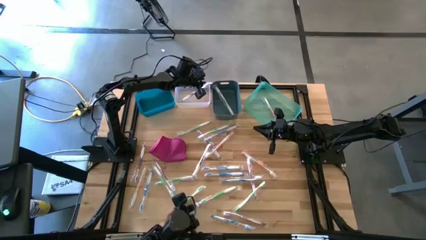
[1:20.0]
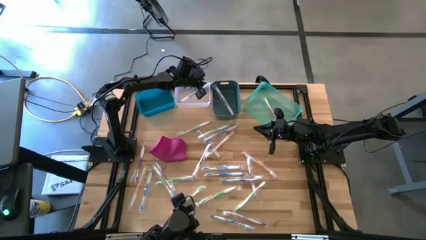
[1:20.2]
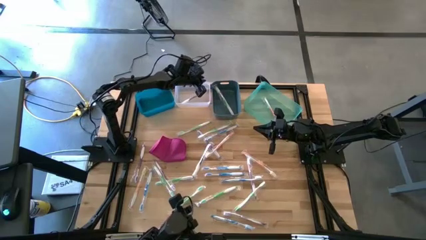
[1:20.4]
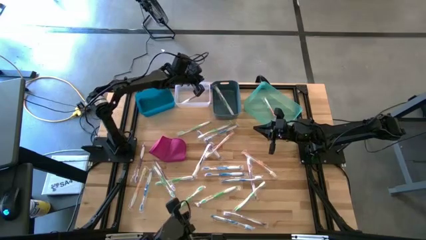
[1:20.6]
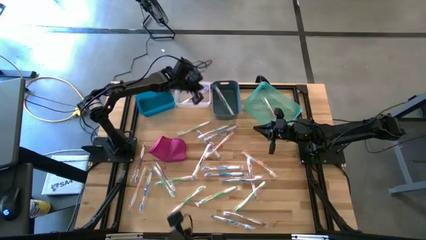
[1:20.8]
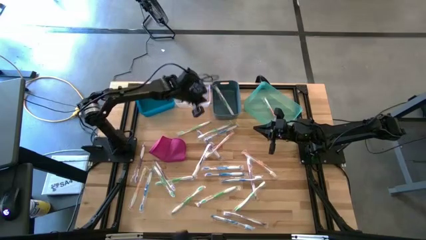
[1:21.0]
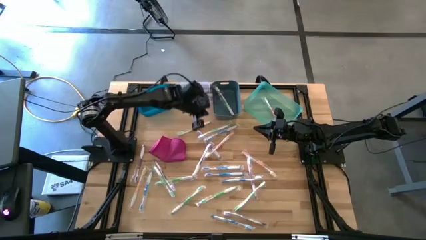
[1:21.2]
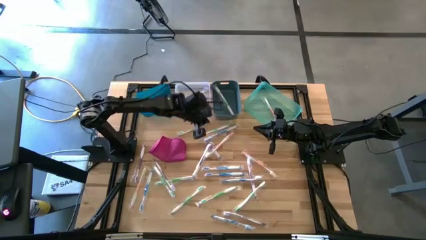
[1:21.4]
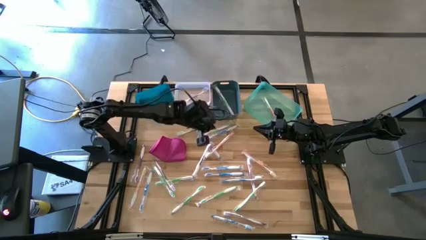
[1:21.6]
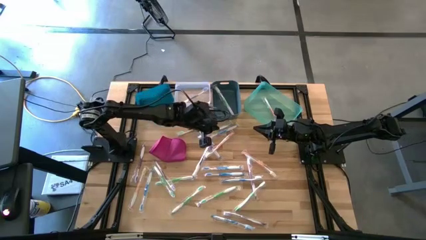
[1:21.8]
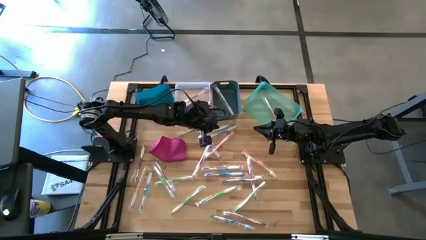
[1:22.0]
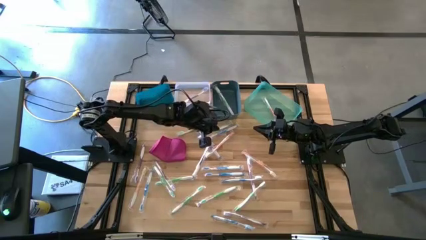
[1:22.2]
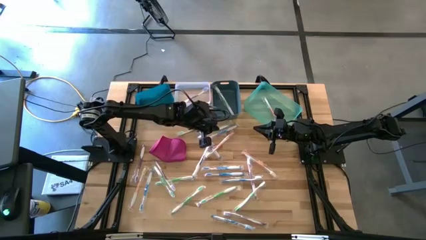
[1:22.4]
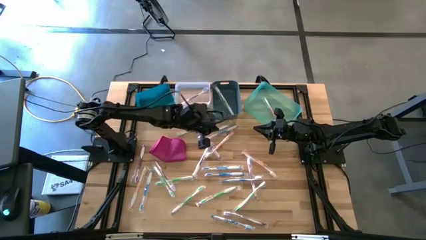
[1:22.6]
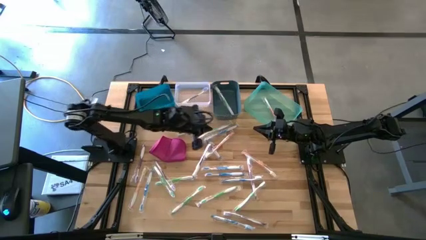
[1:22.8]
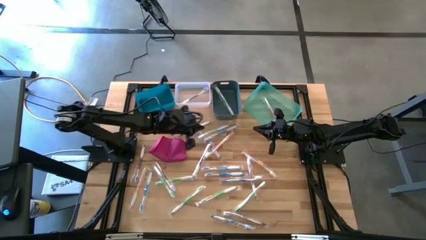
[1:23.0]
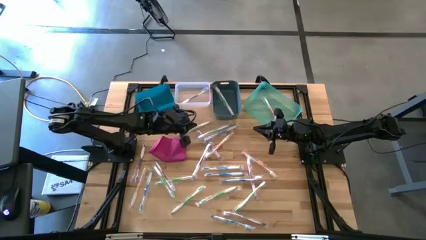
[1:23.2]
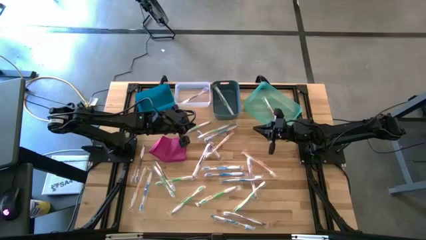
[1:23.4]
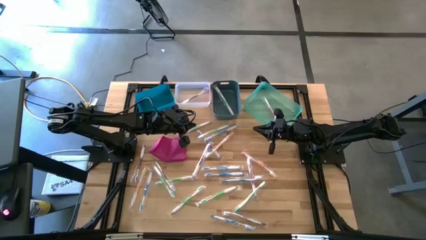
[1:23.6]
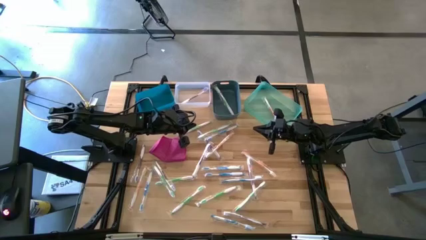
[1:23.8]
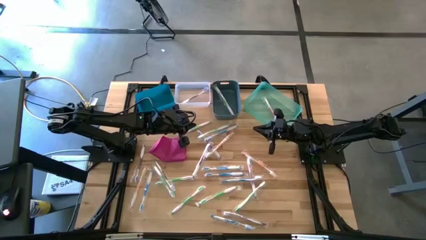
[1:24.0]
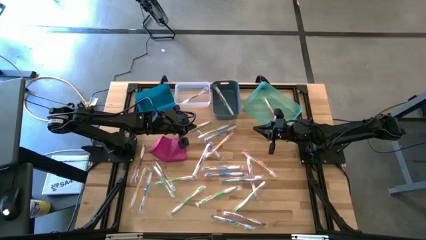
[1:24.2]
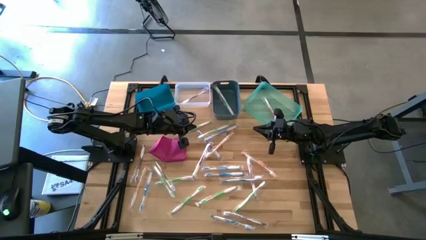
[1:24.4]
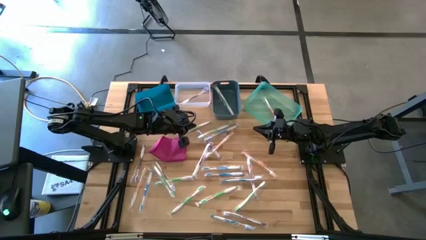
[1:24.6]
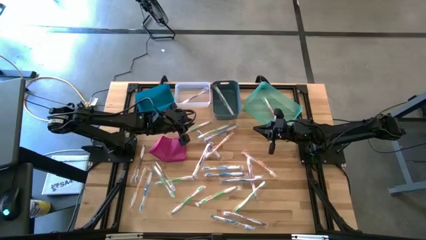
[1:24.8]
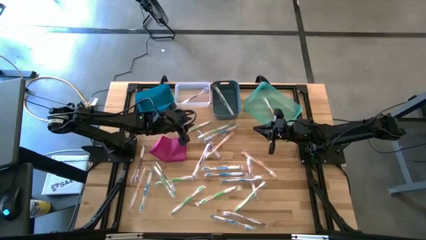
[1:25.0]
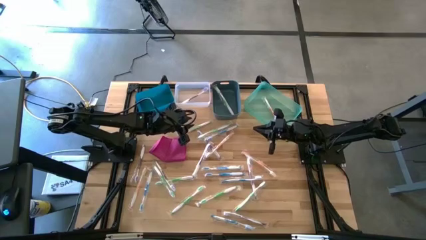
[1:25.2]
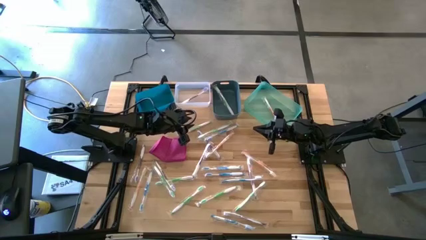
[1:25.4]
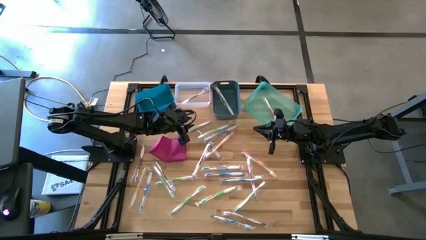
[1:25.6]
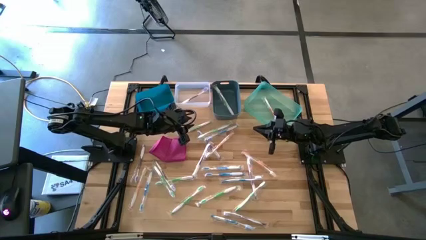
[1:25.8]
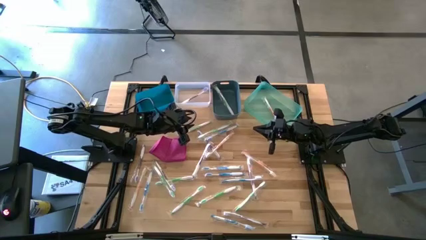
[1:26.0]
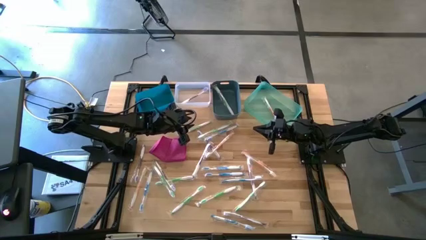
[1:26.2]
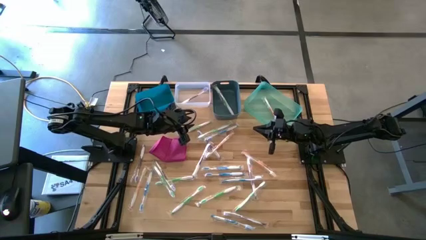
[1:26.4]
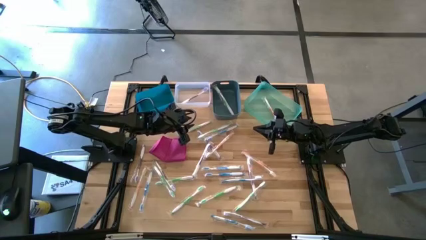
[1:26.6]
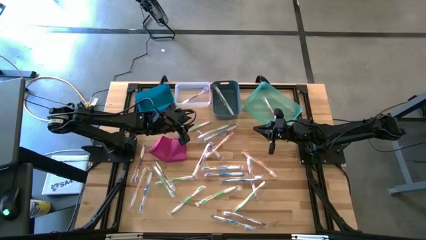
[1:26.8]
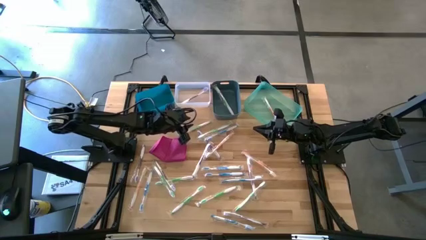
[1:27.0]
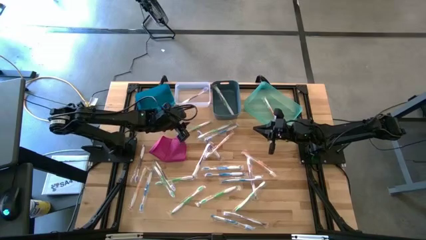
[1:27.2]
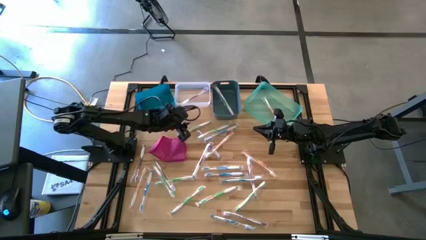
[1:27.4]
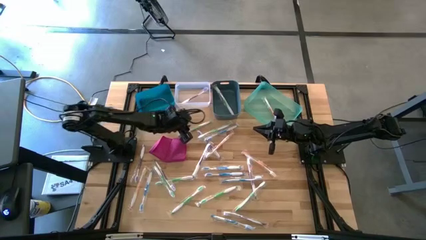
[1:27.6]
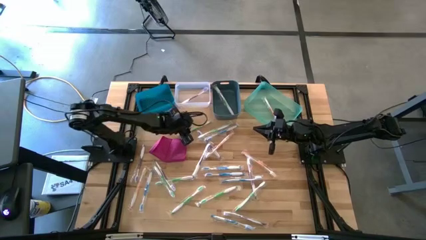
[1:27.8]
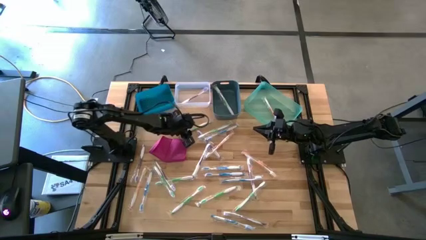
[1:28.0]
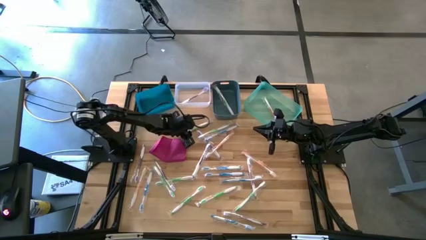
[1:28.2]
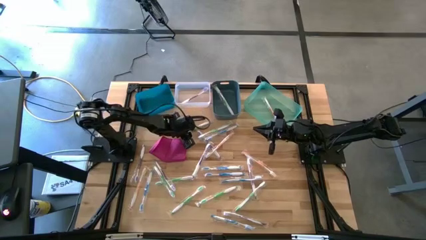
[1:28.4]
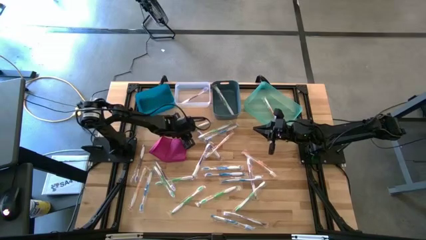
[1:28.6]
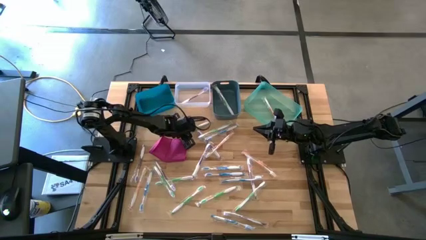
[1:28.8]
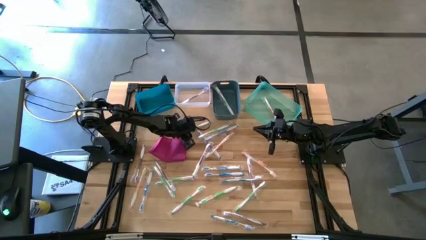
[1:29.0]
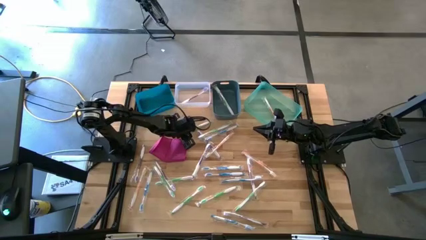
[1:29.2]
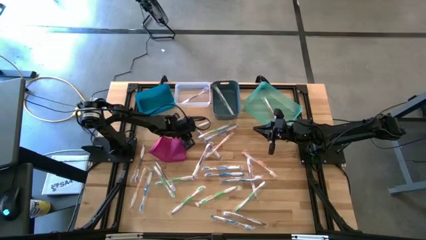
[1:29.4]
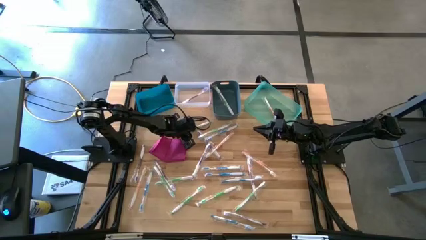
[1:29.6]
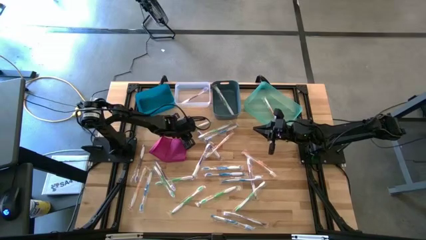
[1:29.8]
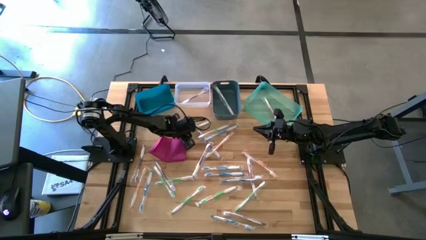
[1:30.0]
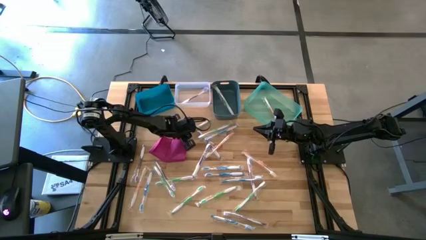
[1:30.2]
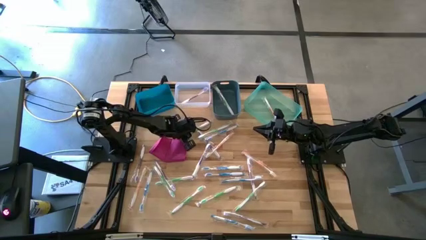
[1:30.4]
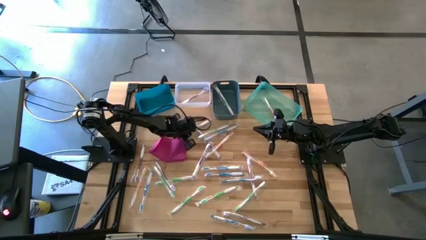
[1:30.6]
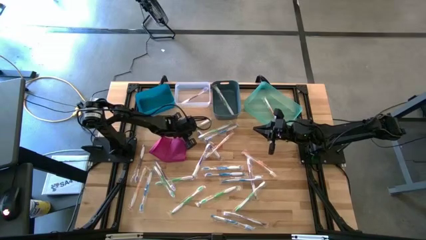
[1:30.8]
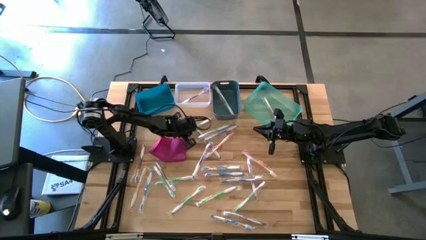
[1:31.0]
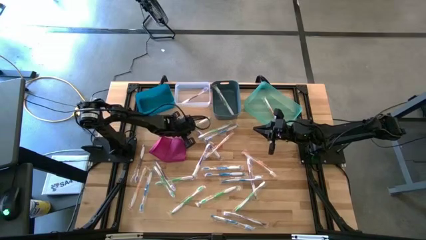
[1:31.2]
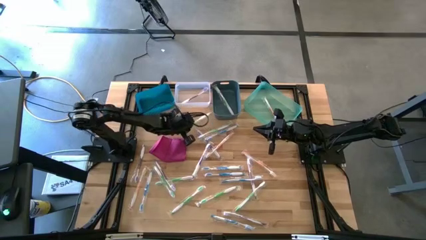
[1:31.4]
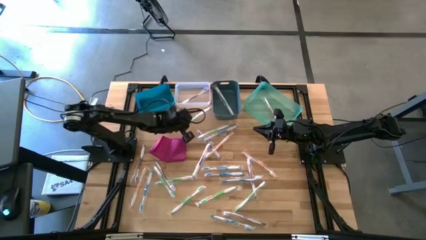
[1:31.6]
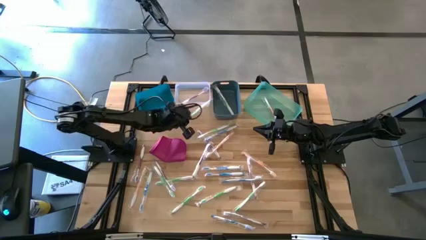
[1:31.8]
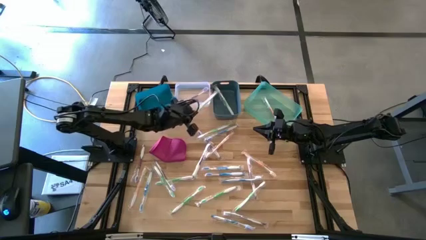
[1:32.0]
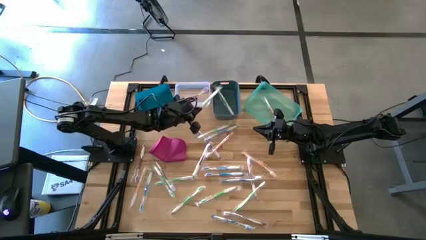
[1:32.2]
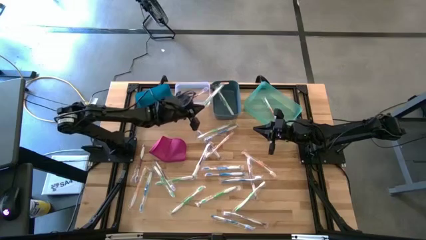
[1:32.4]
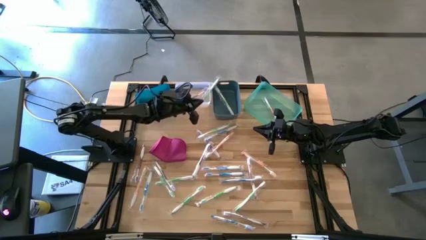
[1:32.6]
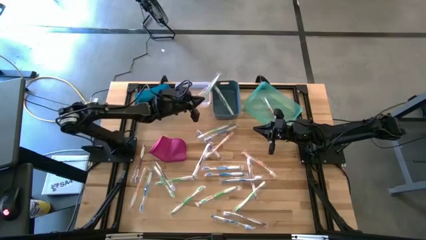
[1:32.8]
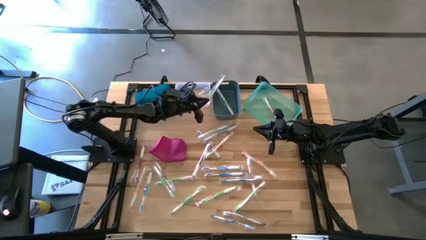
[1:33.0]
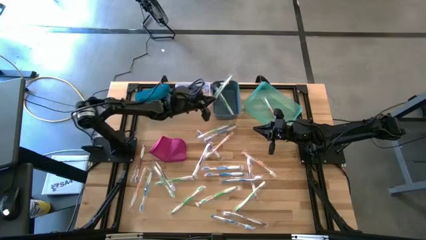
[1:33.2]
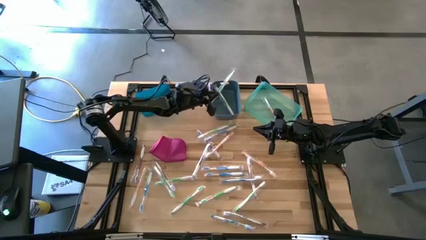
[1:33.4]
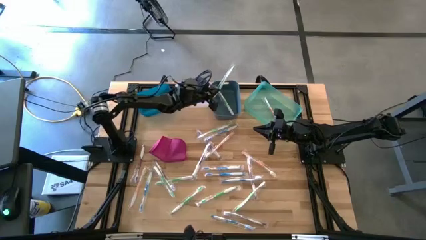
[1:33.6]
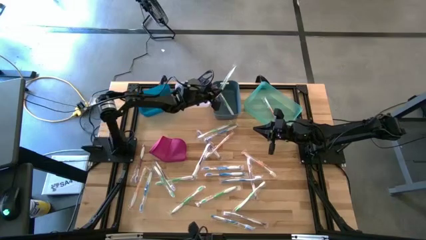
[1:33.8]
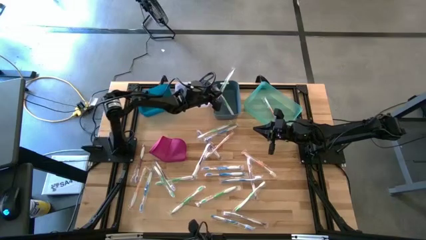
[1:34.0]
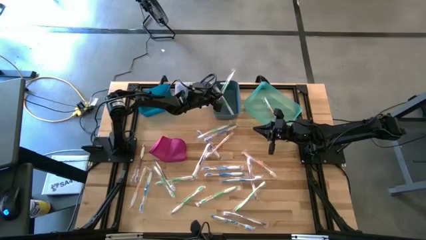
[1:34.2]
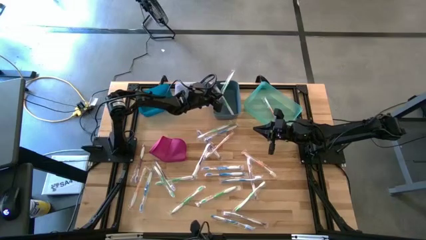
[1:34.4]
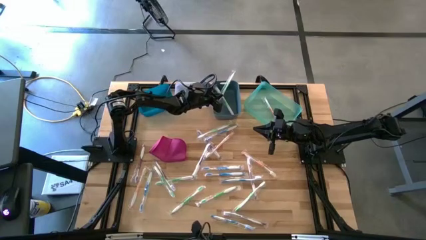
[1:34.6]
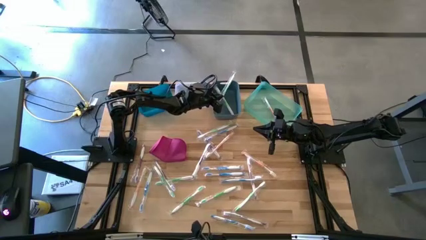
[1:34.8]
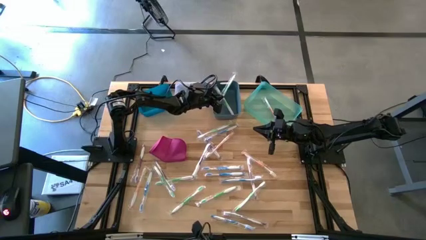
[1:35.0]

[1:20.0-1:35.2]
Task: Pick & Place Toothbrushes
Put the green toothbrush into the dark blue bin

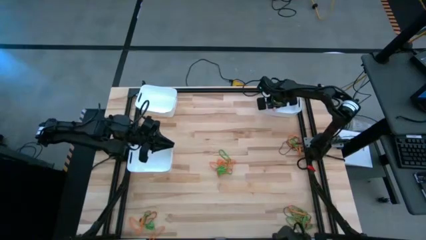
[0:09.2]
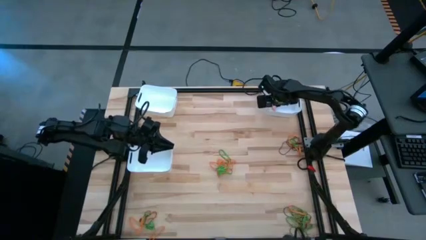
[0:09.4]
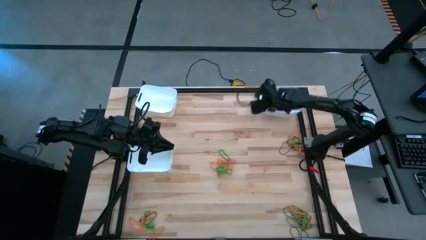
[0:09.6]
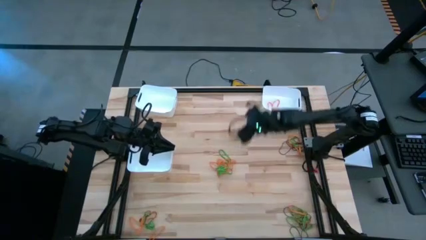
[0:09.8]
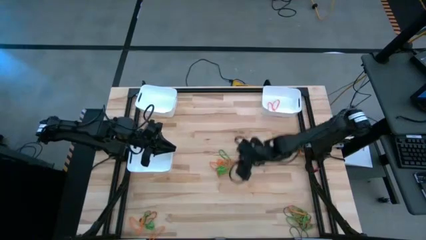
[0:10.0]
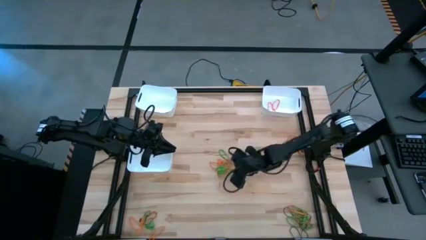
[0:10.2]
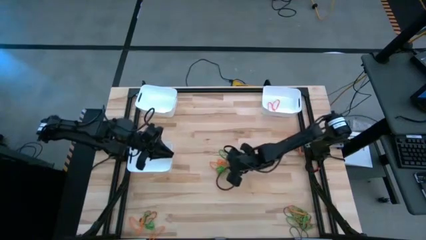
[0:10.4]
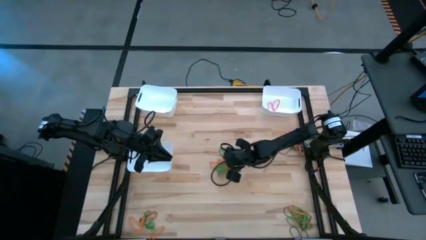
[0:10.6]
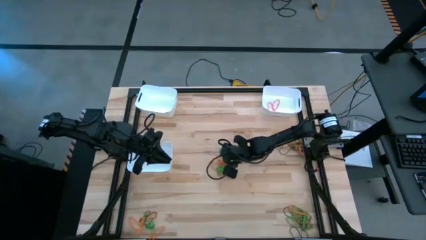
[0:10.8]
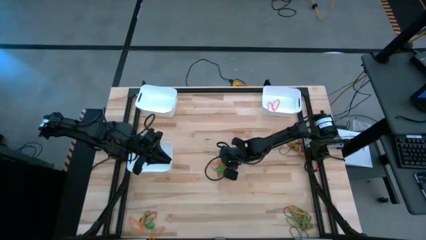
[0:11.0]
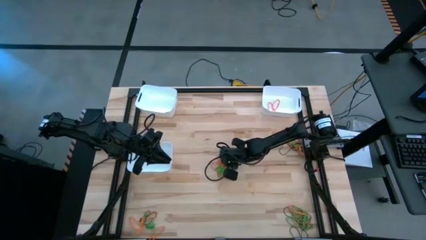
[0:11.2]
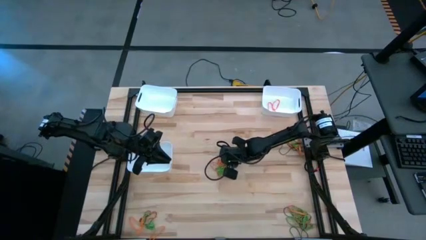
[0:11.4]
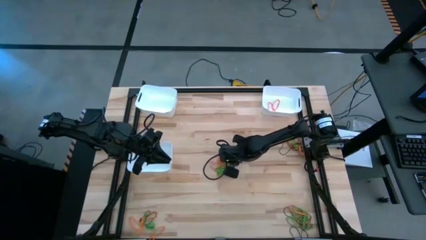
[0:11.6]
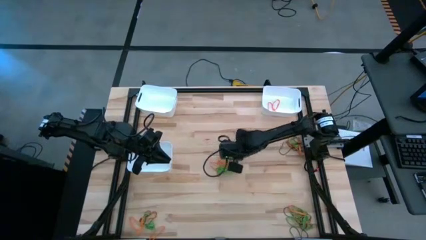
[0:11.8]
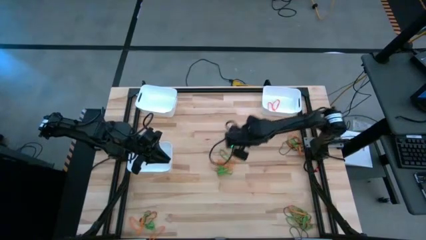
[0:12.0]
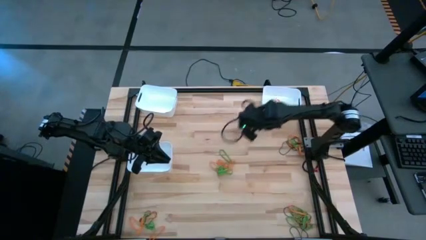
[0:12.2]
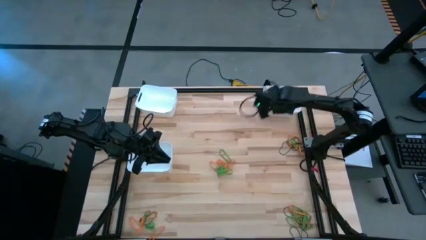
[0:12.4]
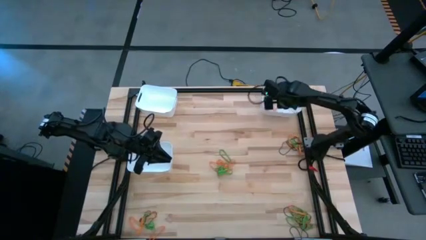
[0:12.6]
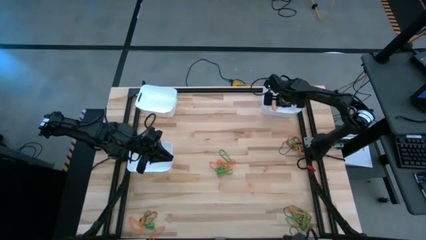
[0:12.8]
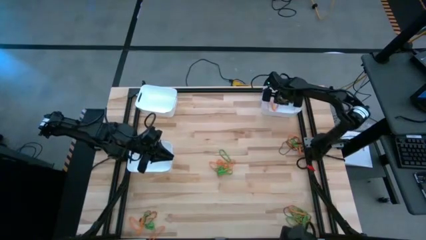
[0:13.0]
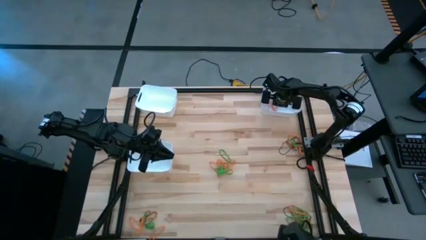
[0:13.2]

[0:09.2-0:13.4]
Task: Sort rubber bands into baskets
Put the orange rubber band into the top right white bin
